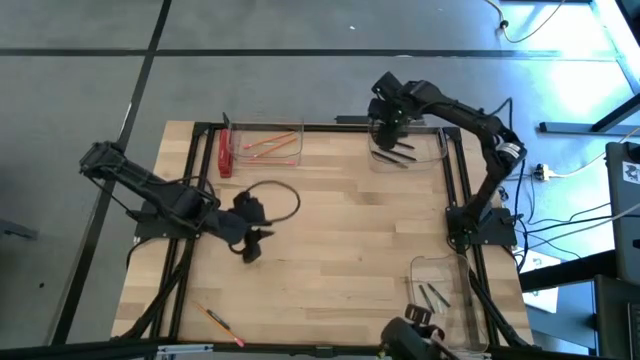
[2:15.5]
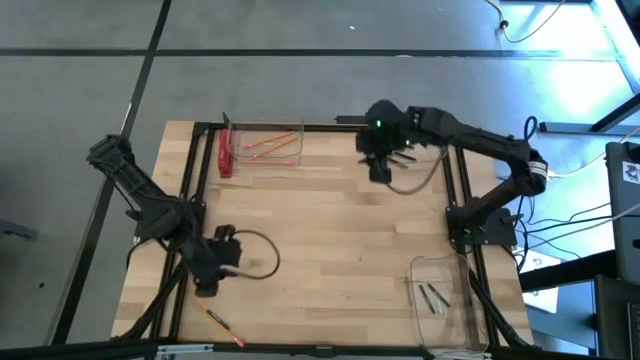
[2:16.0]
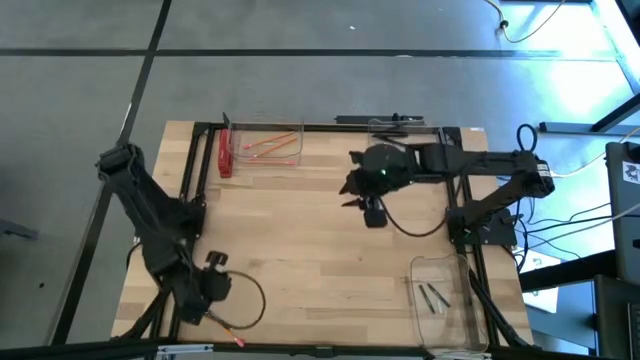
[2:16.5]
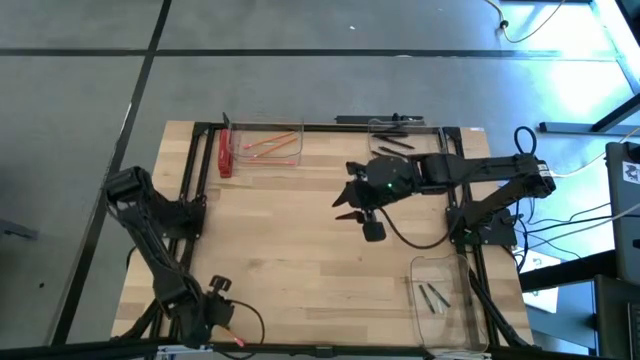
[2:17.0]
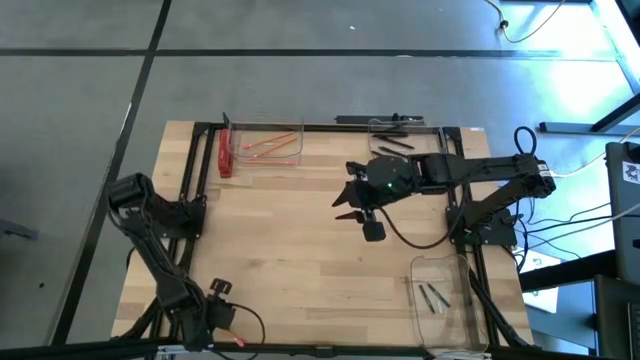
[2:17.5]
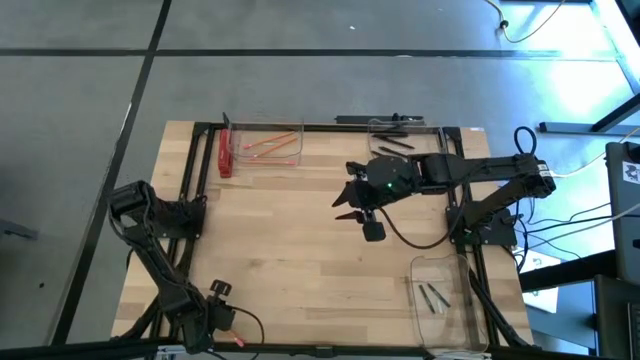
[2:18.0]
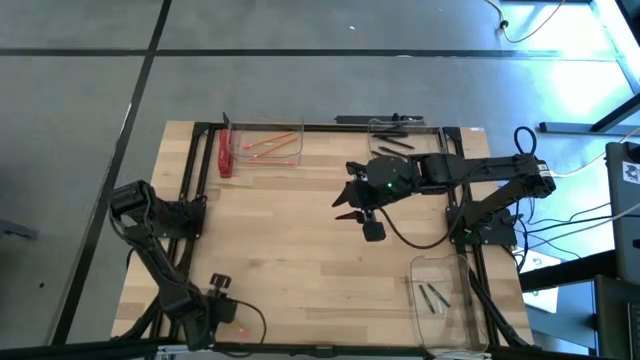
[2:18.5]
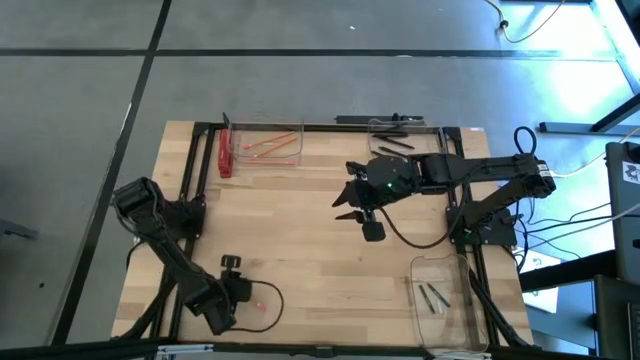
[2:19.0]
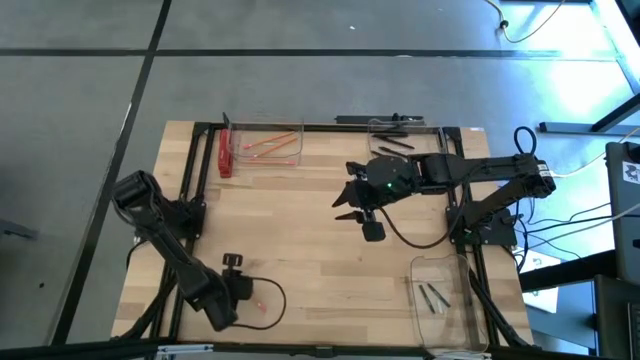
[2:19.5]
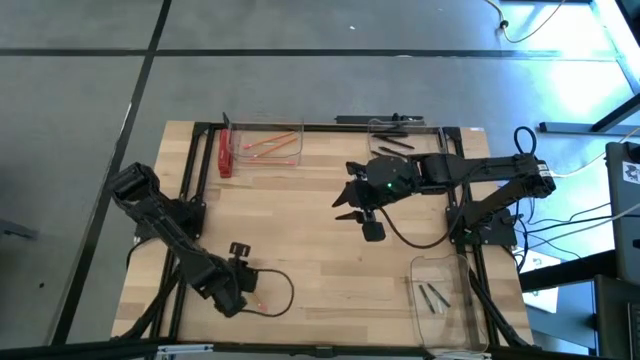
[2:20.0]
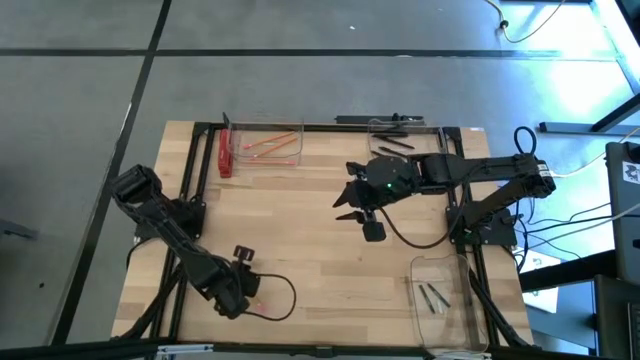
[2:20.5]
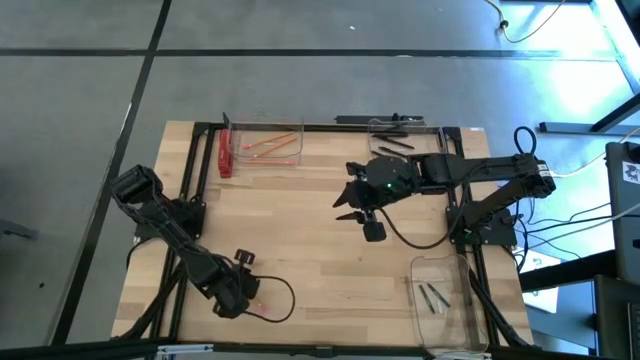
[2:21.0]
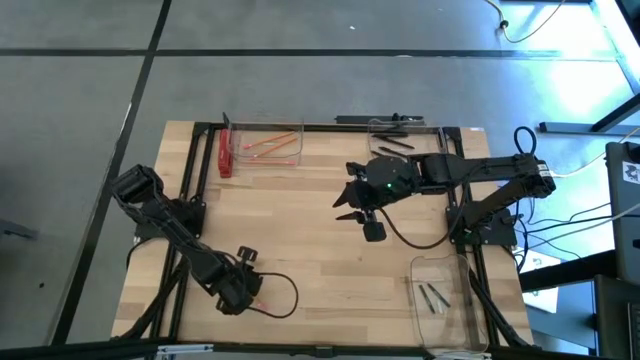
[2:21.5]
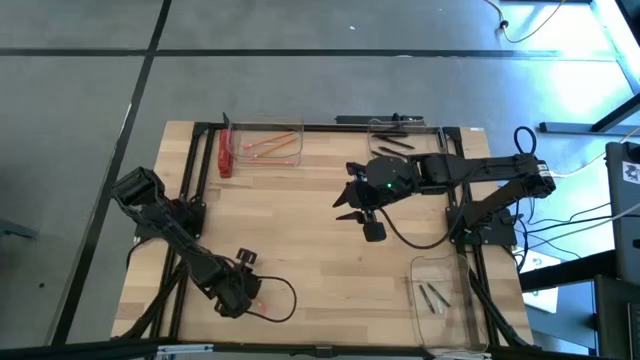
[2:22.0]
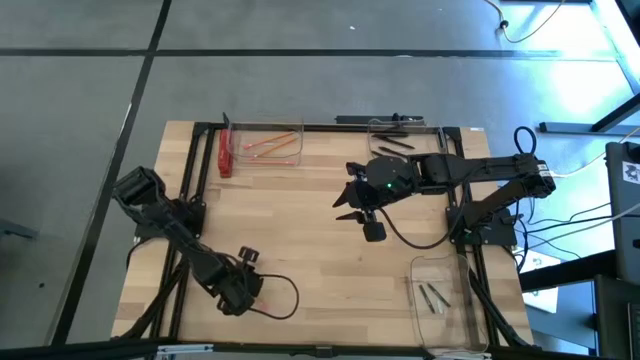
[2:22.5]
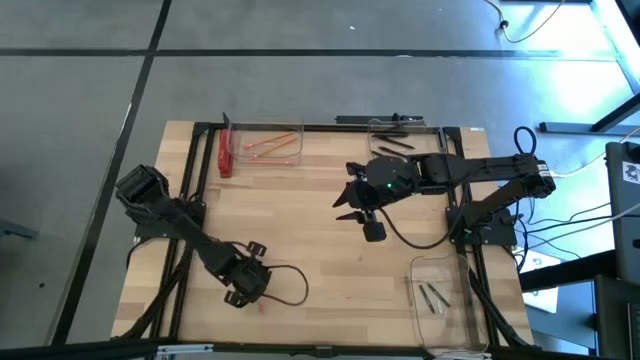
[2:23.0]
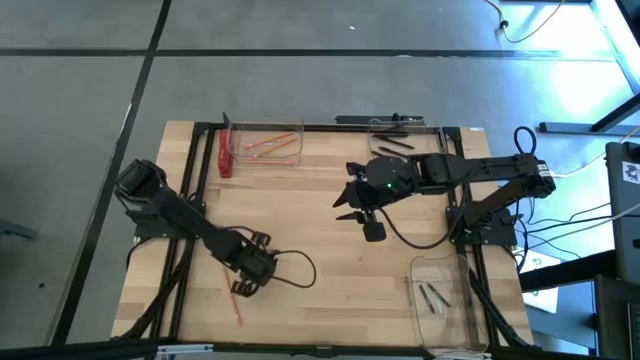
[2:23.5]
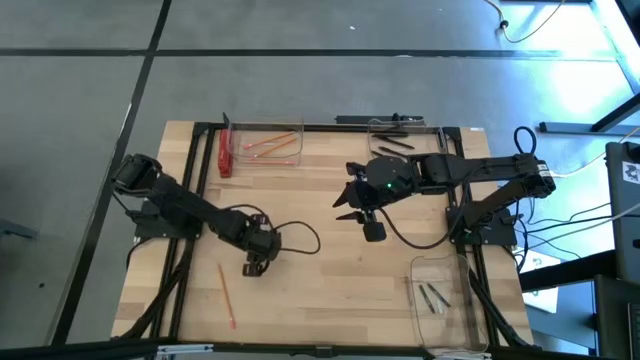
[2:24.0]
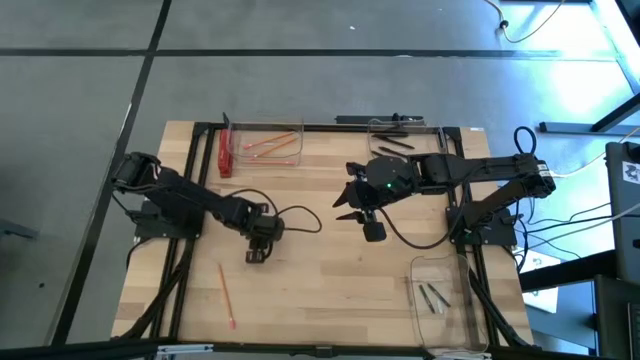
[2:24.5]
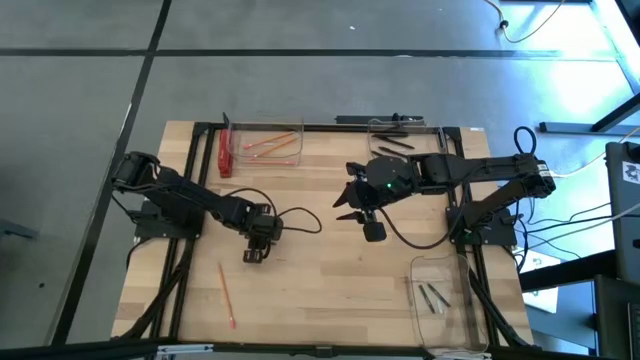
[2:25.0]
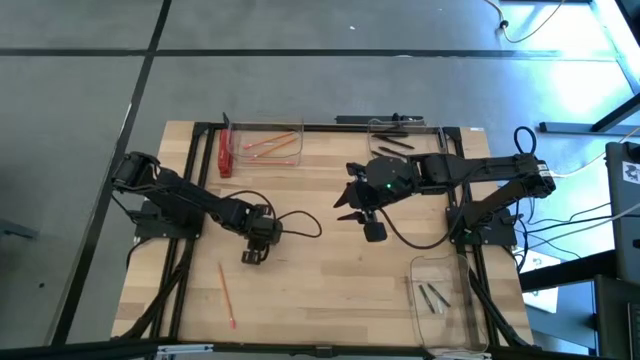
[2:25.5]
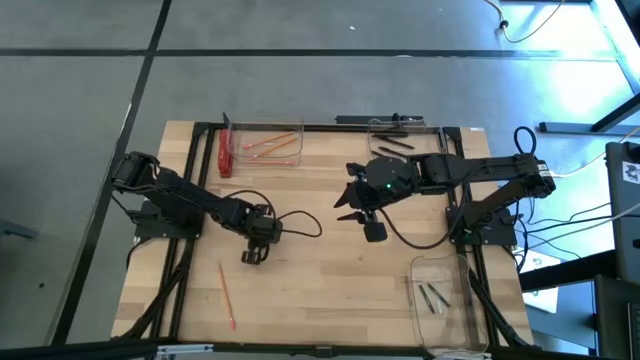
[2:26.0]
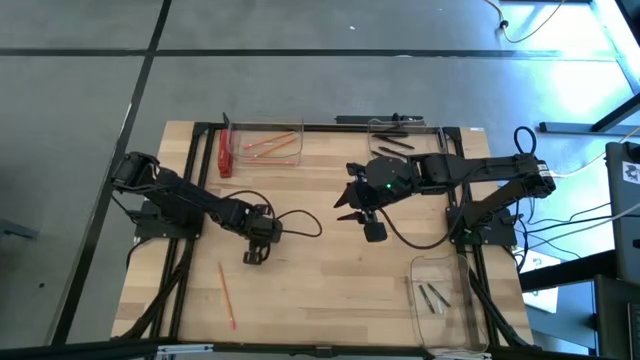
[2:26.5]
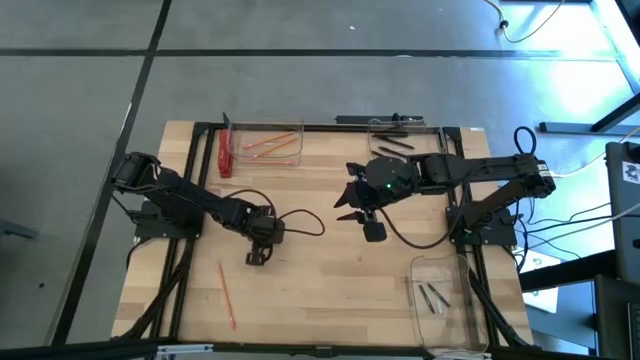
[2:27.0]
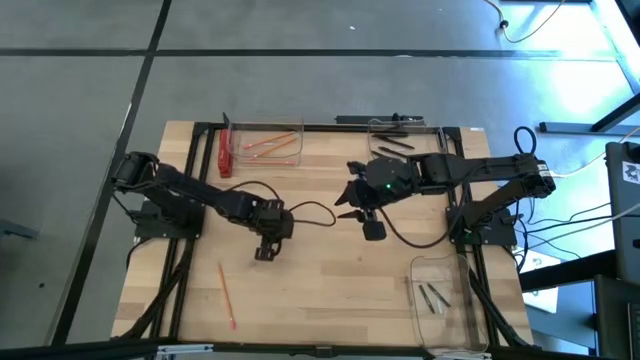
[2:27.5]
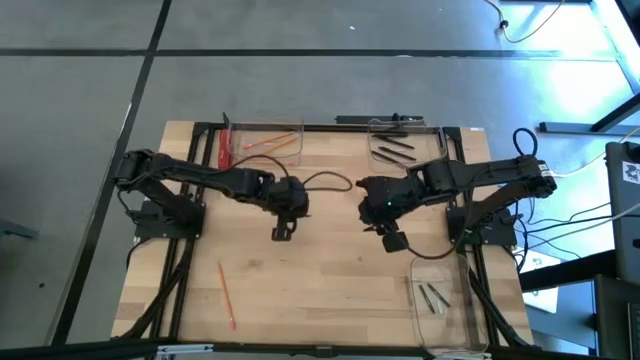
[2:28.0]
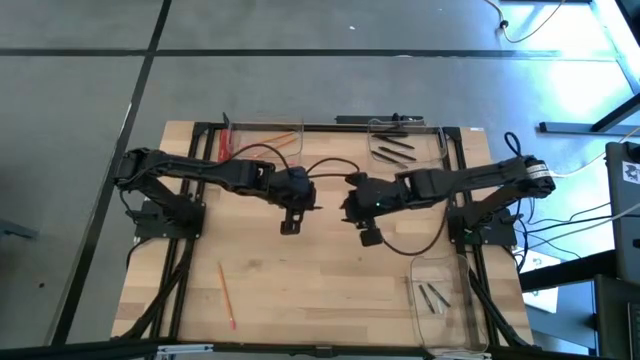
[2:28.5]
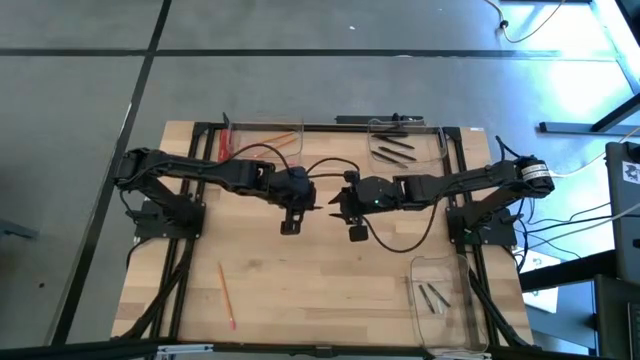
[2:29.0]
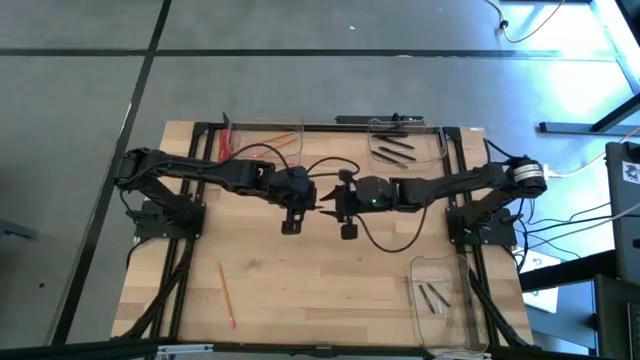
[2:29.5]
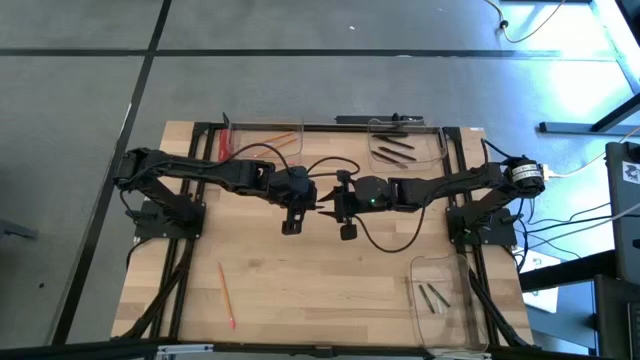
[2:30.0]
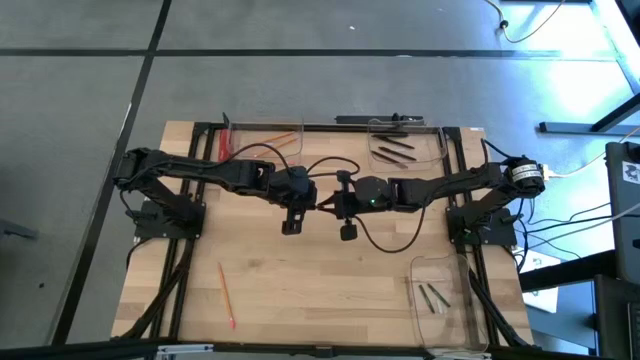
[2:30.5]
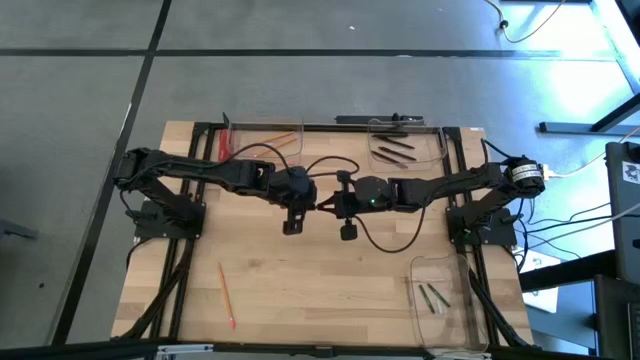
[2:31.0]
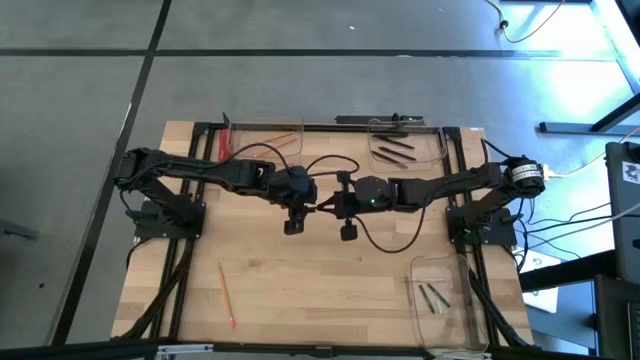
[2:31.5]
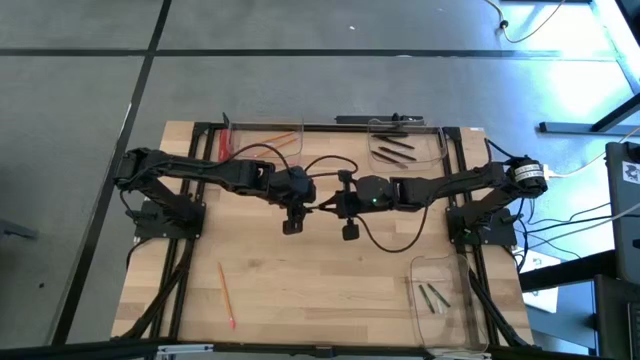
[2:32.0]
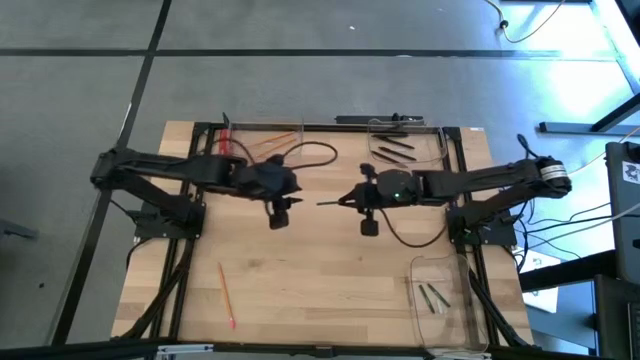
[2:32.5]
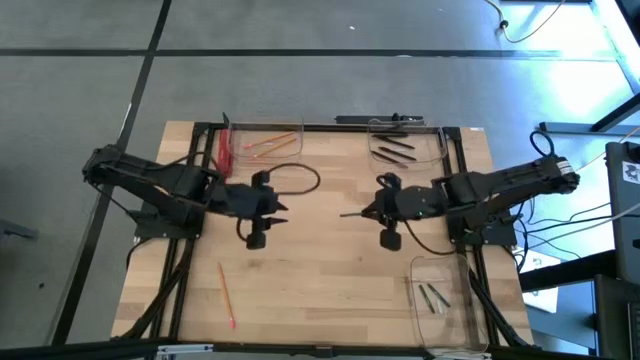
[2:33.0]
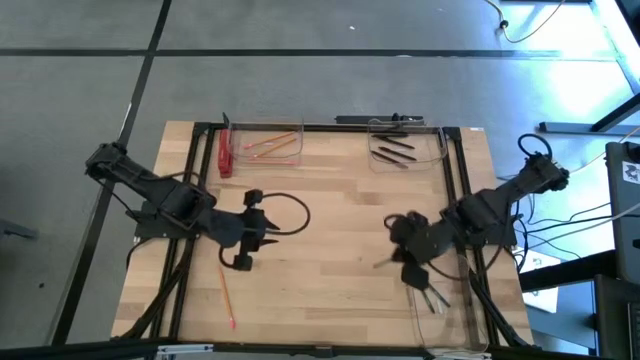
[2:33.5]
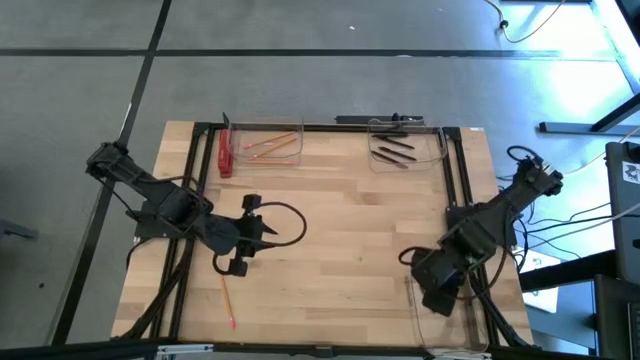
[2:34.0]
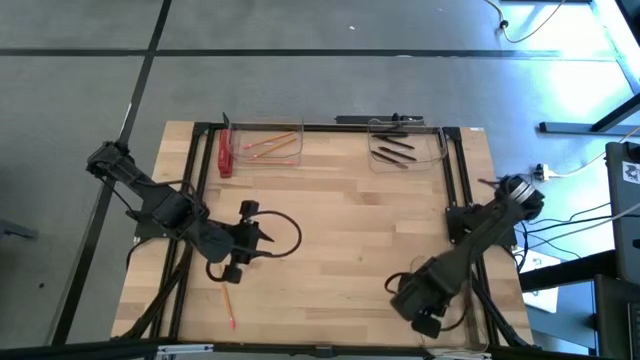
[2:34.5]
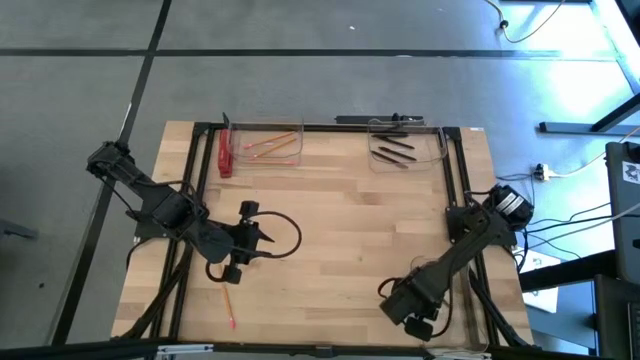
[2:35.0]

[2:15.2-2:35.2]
Task: Sort crayons/erasers/pens/pencils in bins
Put the green crayon into the bottom transparent bin

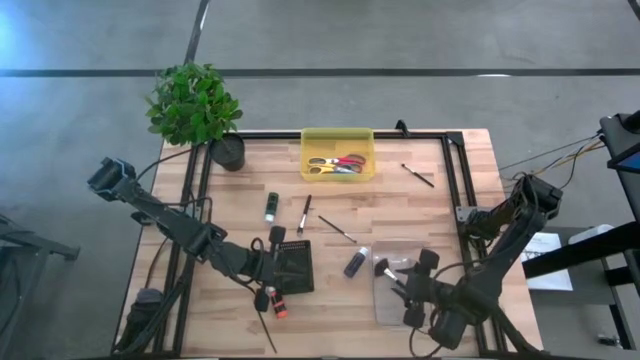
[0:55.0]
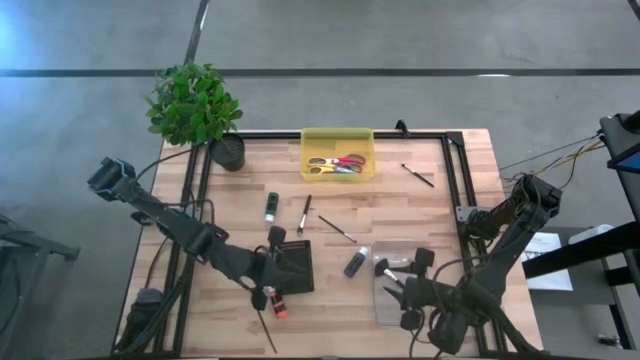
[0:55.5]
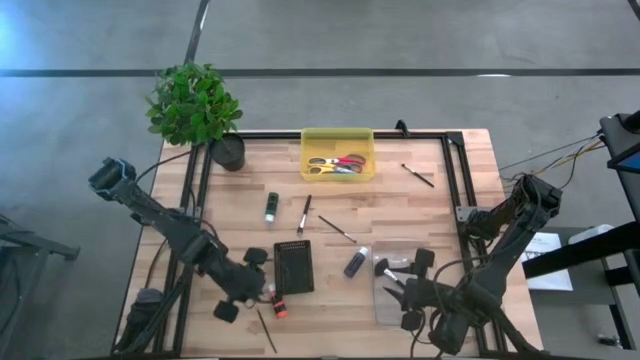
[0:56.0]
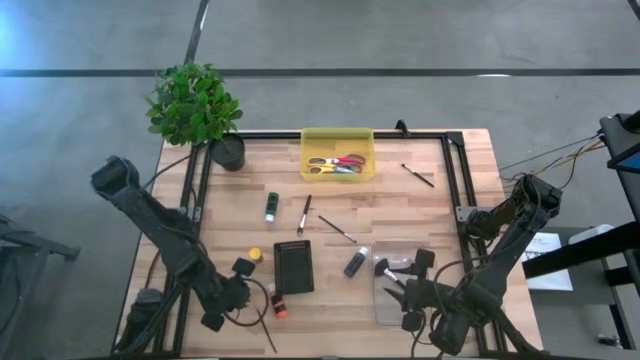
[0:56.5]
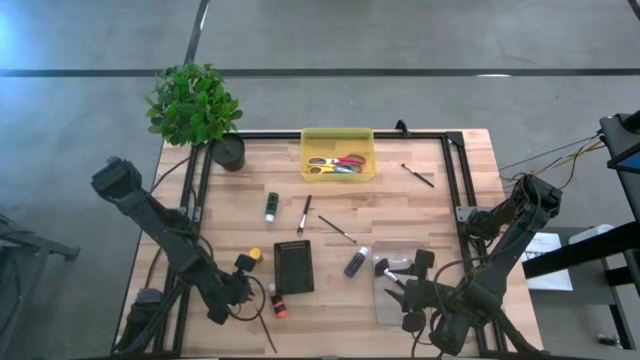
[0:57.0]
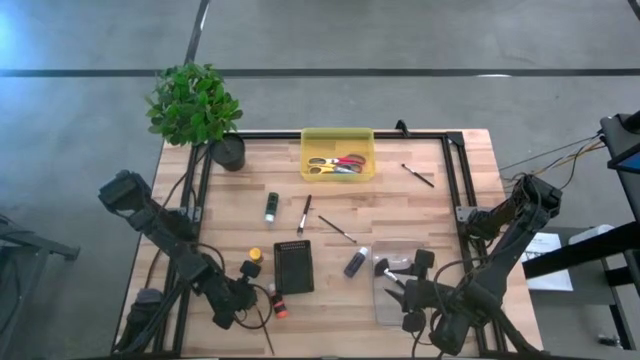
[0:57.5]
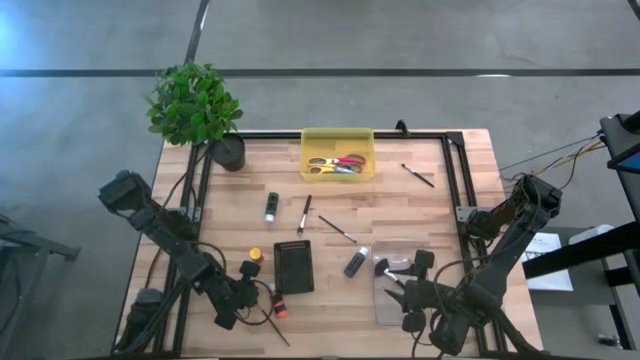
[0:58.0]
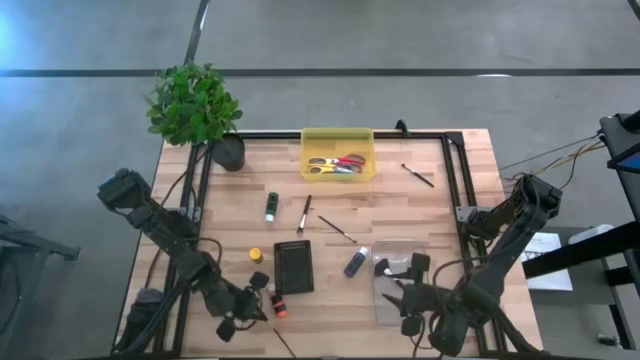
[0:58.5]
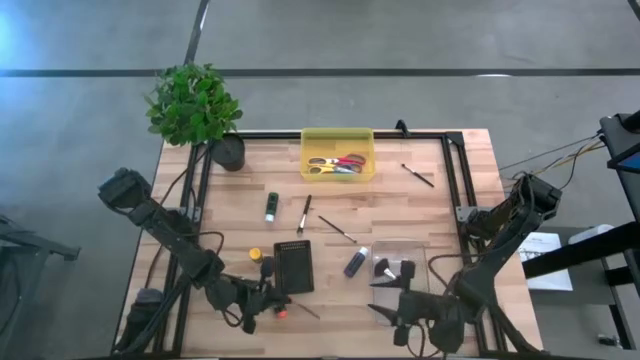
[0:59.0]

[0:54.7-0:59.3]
Task: Pick & Place Paint Supplies
Put the liner brush into the transparent bin
